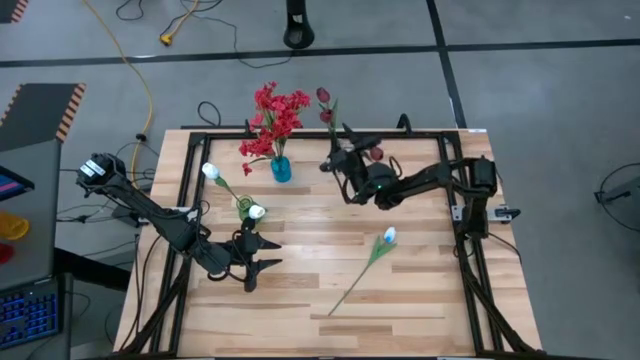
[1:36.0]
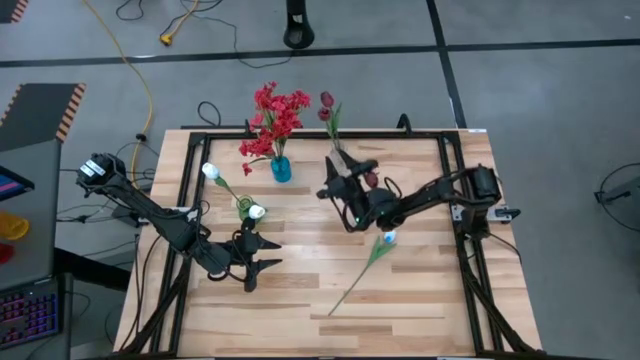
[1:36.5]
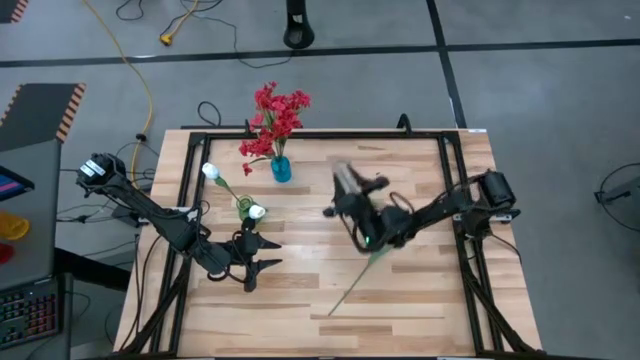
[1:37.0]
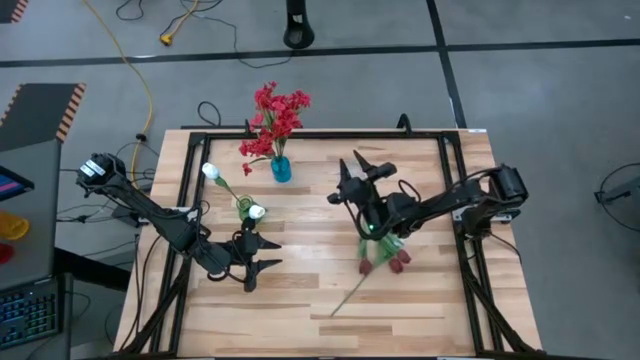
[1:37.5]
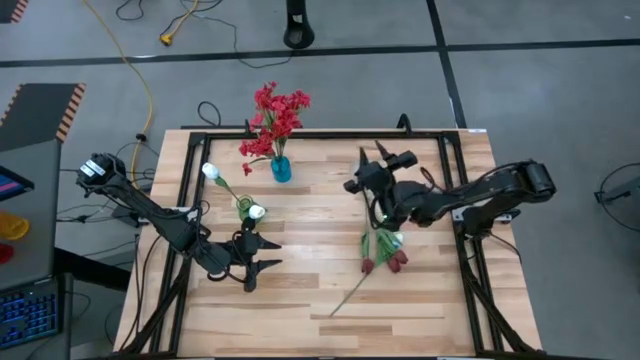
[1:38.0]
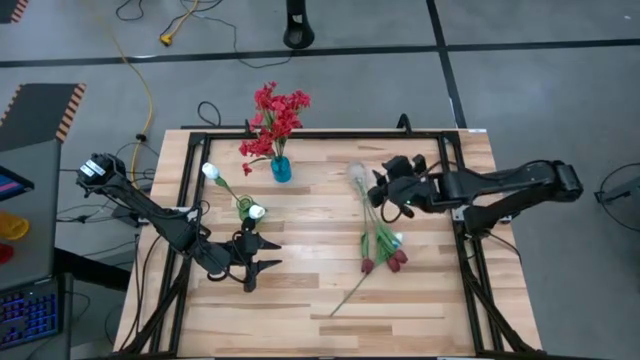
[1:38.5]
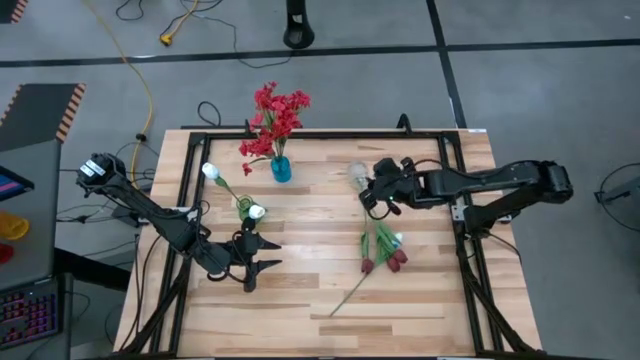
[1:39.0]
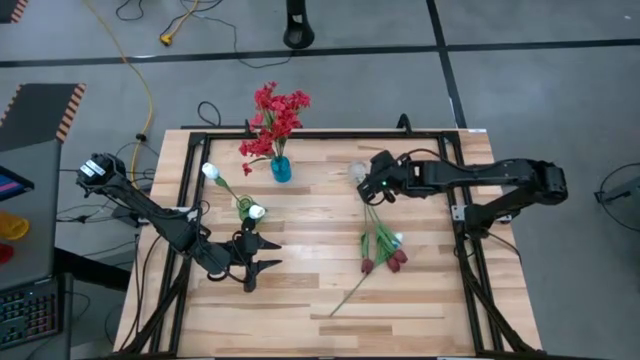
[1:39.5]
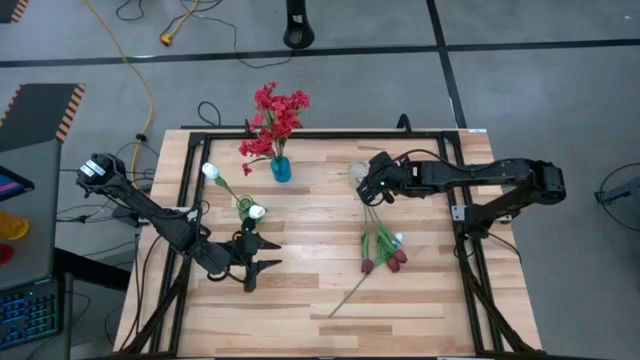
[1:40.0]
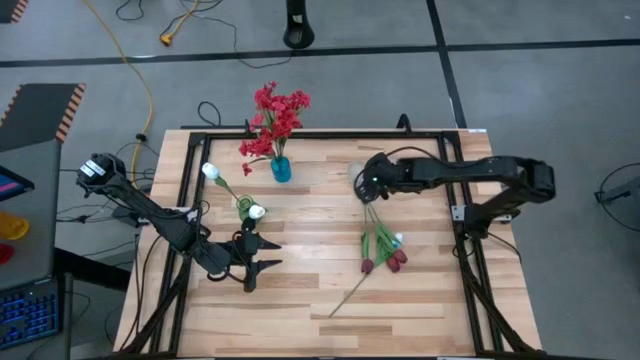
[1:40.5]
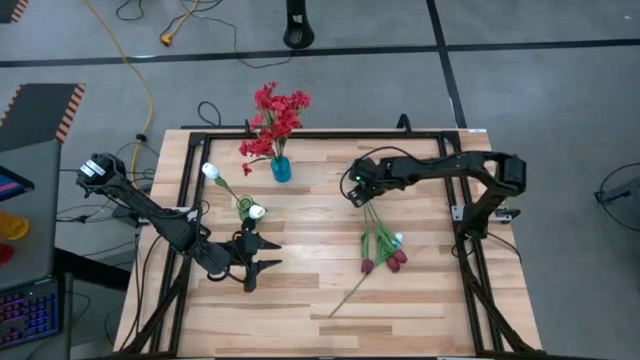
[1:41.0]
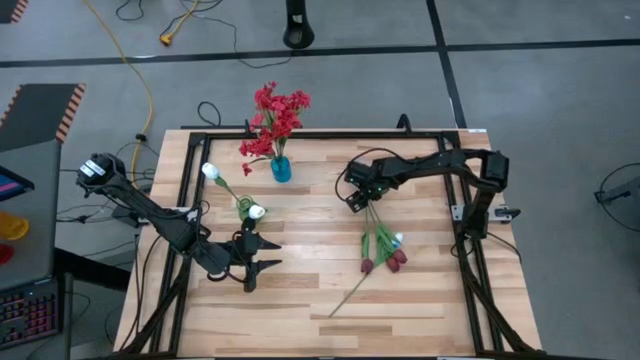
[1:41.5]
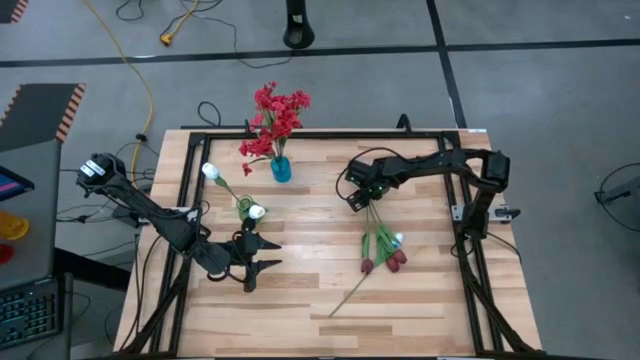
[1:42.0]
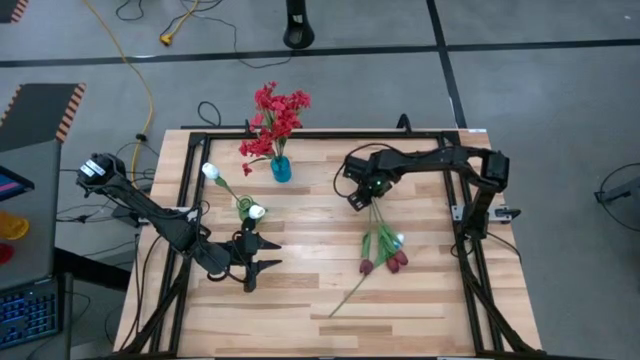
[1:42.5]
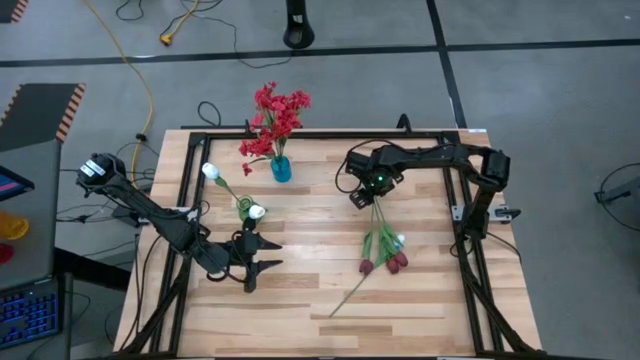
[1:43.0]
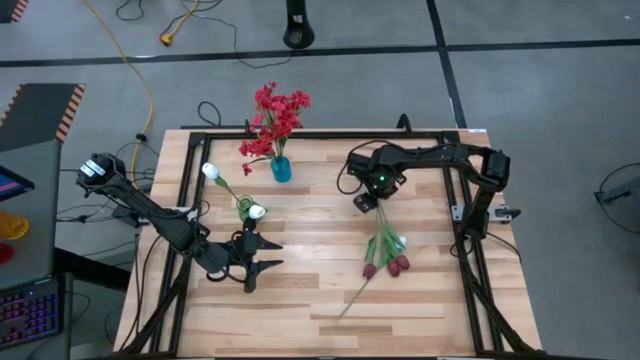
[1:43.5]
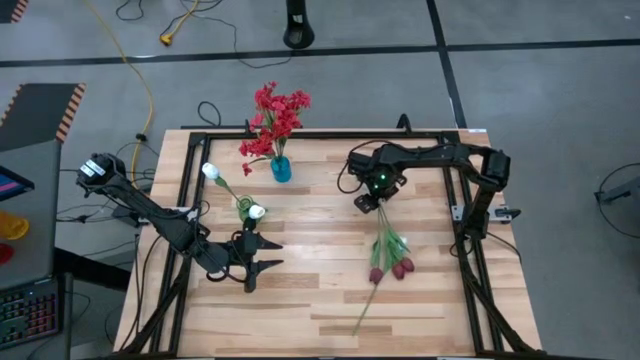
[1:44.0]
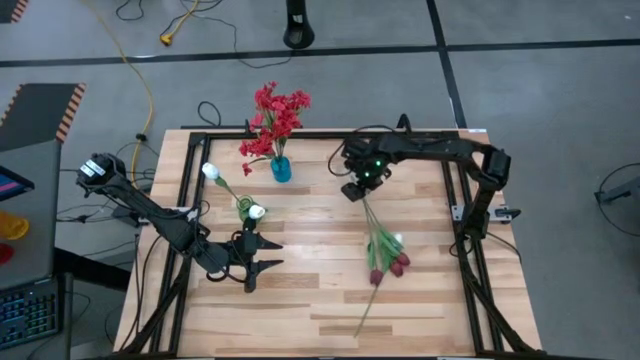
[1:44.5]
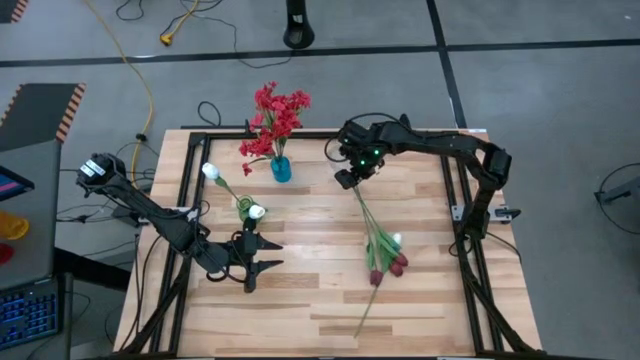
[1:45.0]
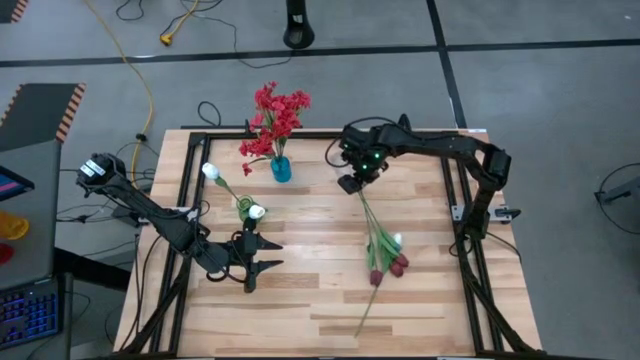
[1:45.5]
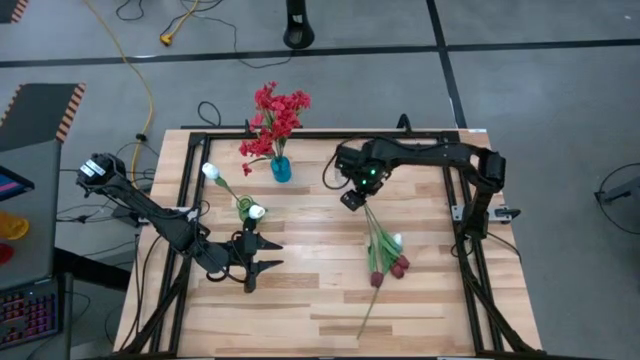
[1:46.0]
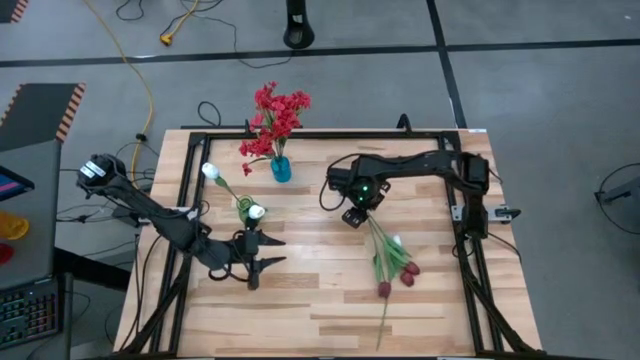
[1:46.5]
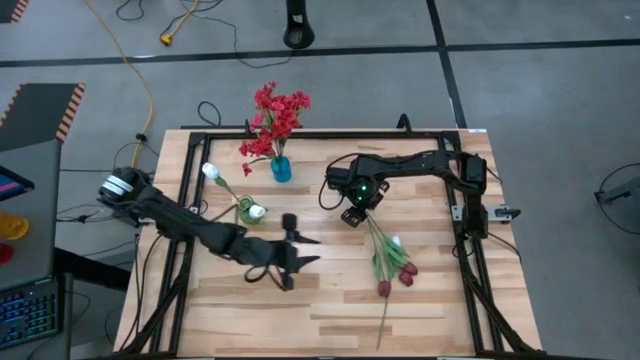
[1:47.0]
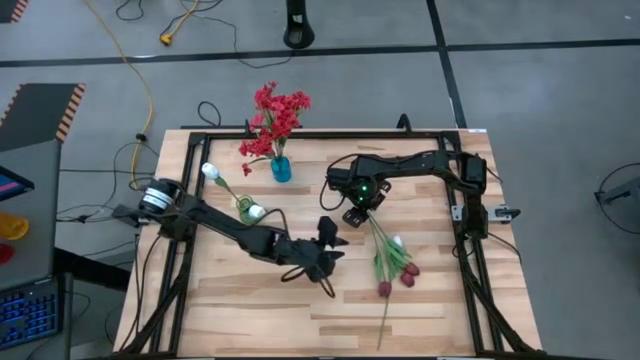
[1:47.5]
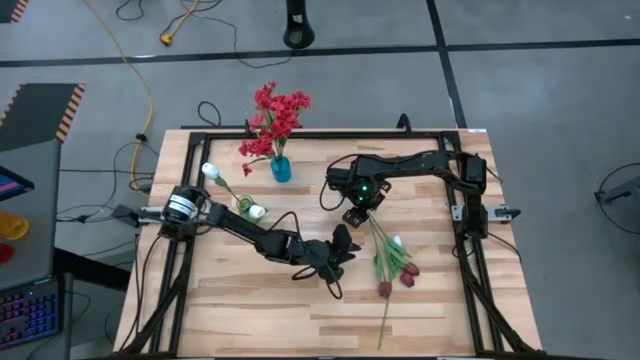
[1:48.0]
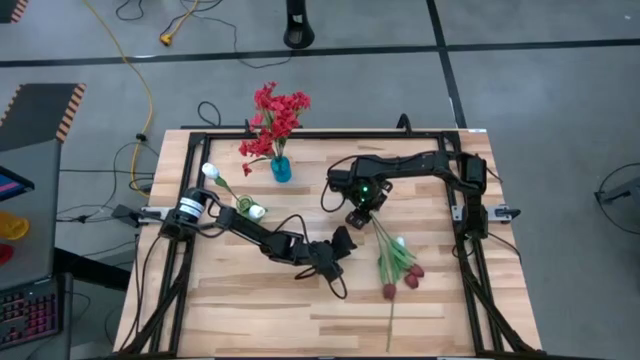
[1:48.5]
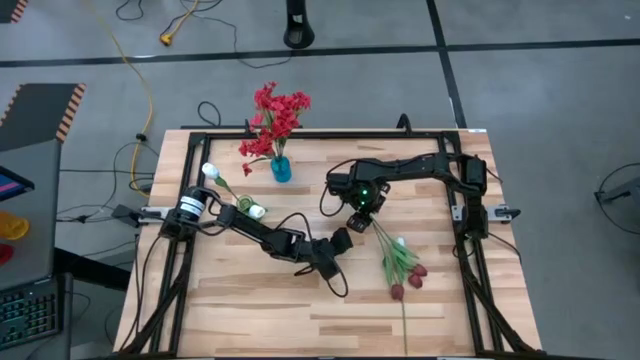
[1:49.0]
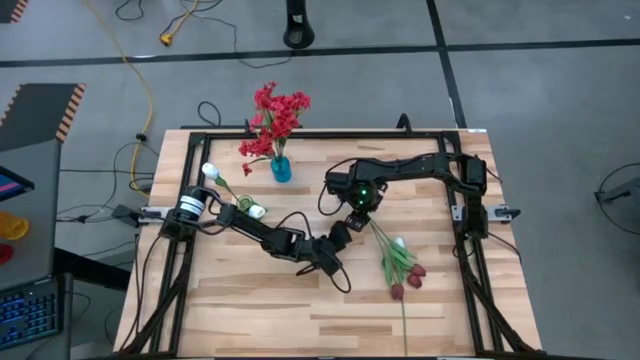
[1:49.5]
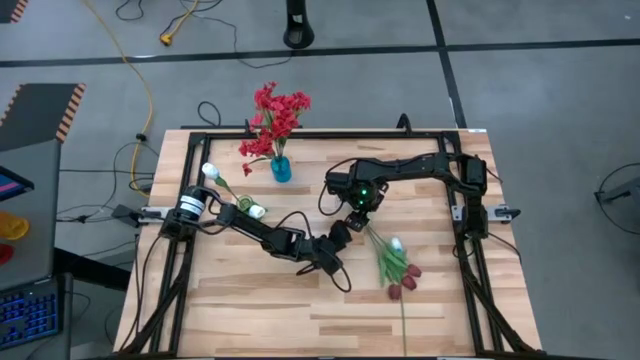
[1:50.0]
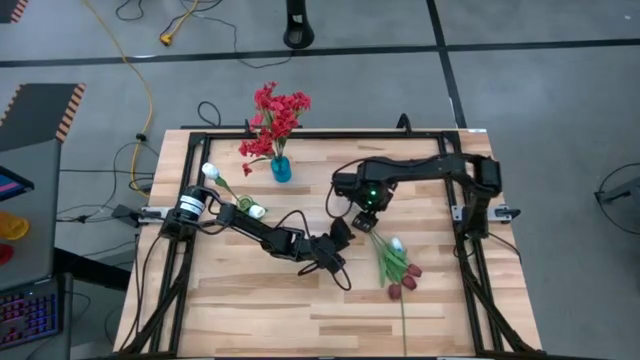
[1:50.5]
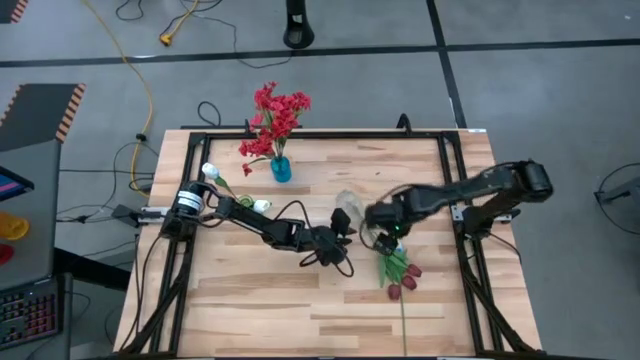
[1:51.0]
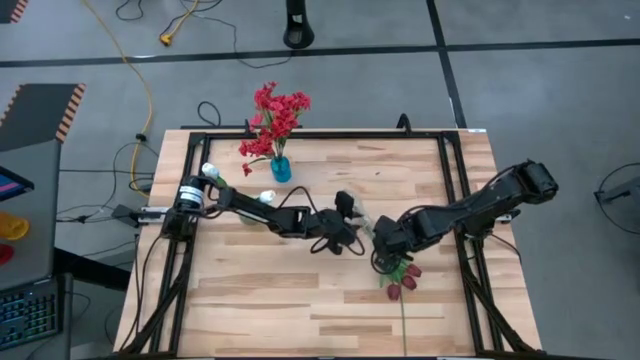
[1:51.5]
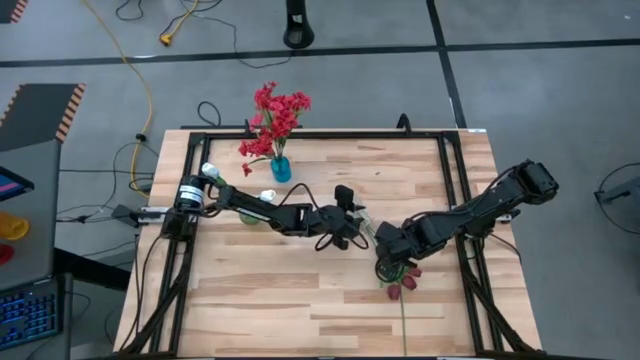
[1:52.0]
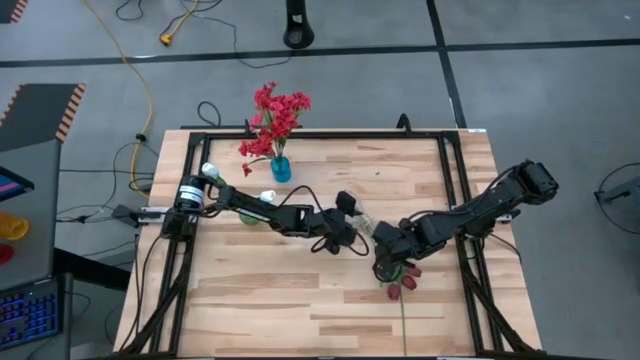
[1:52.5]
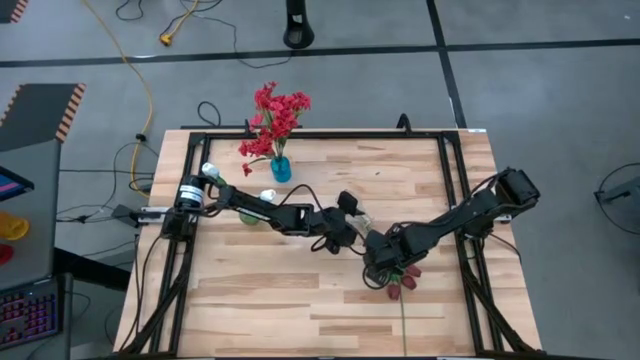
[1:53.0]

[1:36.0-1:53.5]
Task: Sort flowers into vase by color
Adjust the transparent vase by standing it upright on the table

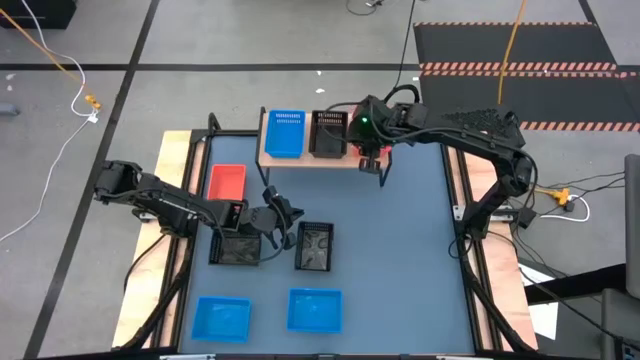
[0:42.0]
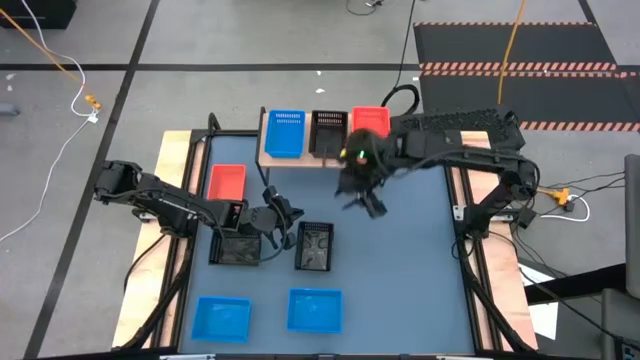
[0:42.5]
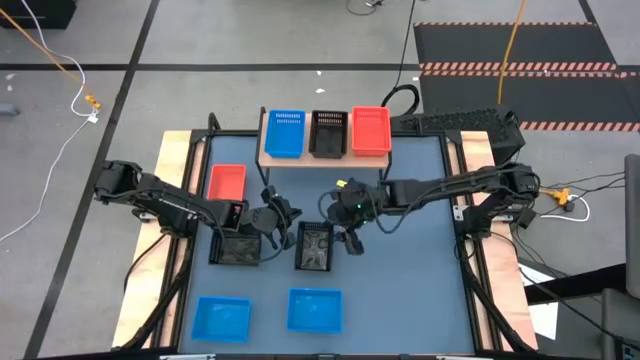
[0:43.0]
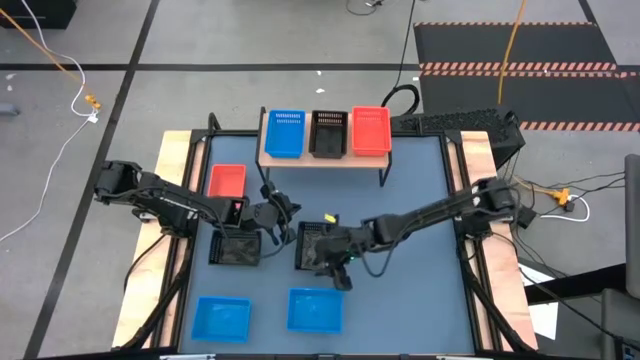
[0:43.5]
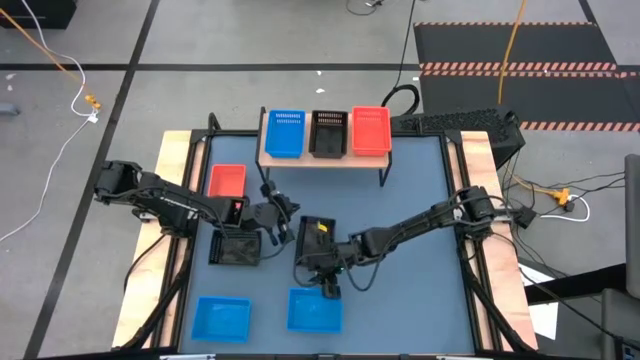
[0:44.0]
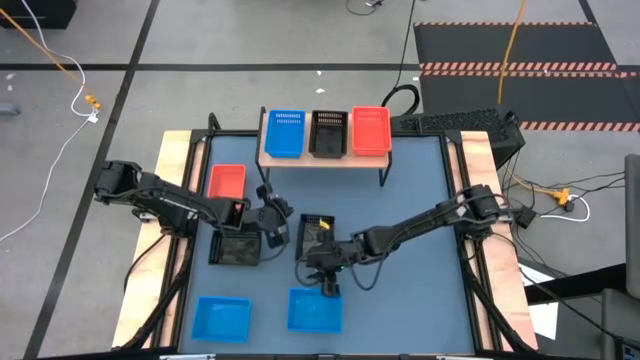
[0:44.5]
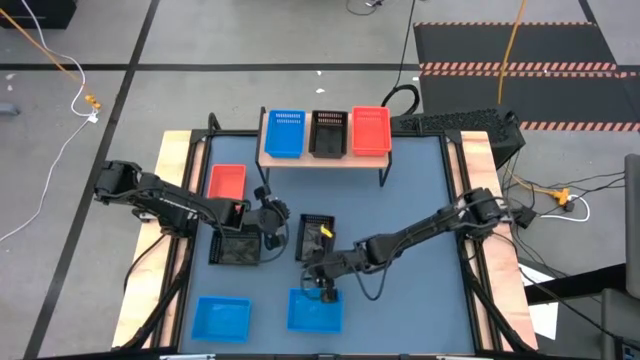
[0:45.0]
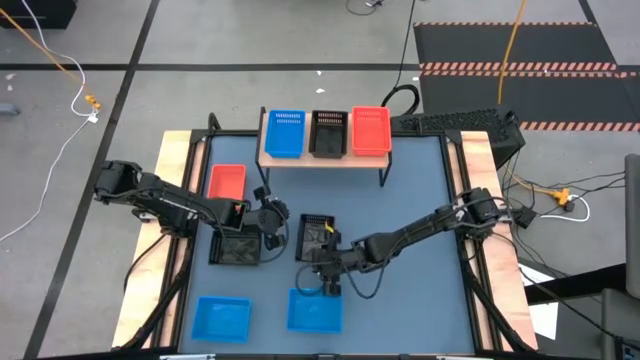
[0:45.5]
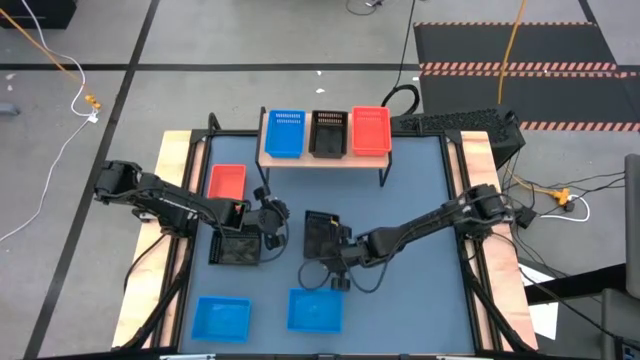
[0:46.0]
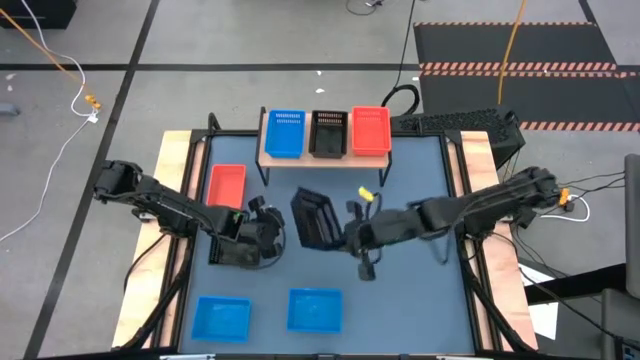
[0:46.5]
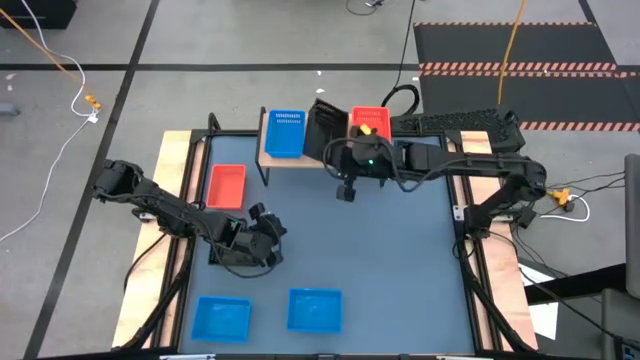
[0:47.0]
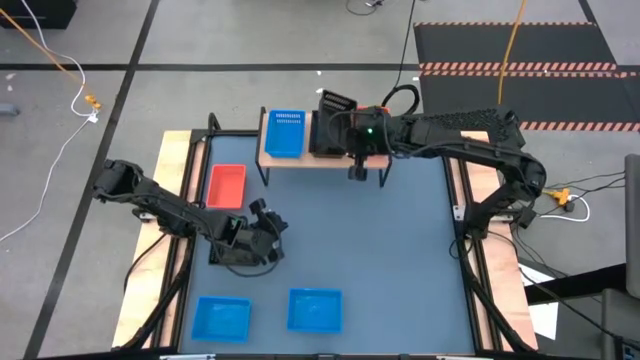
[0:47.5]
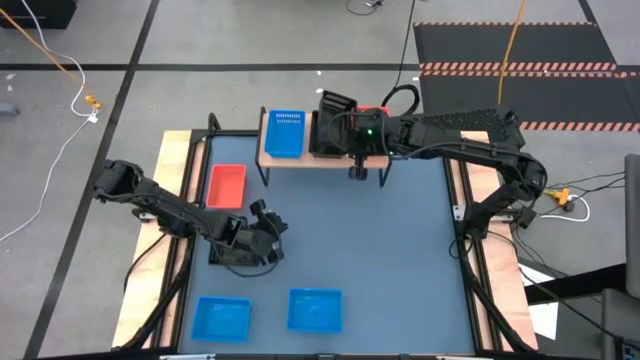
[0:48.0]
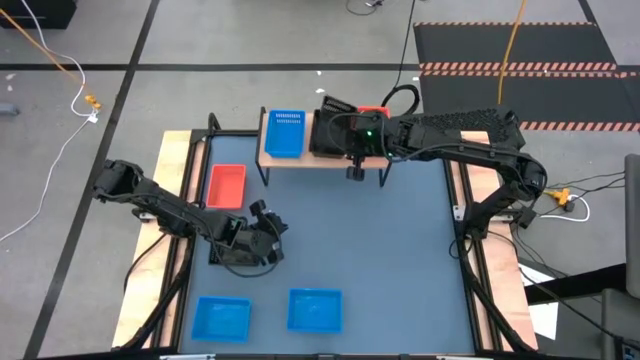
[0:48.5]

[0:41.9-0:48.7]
Task: Stack baskets on shelf by color
Stack the right black bin on the black bin on the shelf
